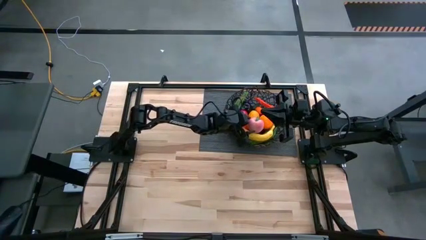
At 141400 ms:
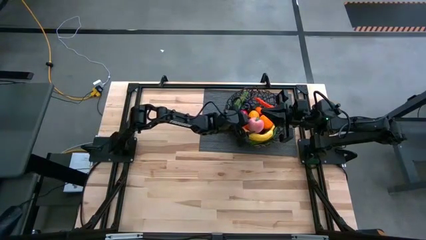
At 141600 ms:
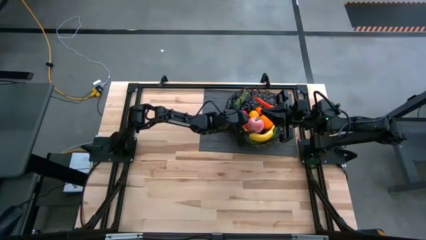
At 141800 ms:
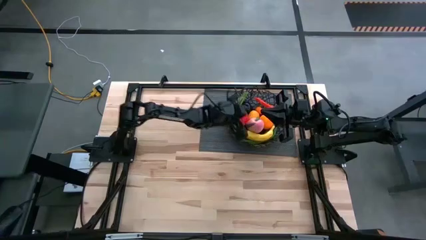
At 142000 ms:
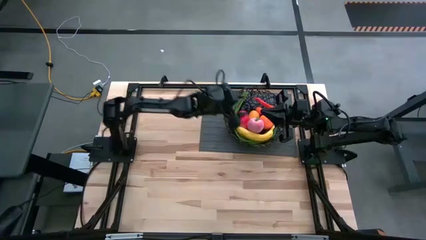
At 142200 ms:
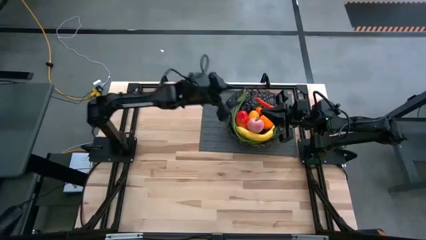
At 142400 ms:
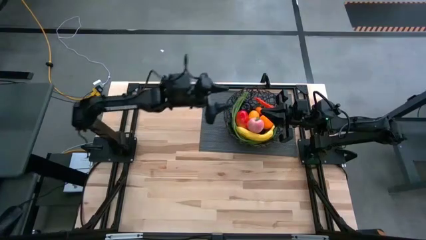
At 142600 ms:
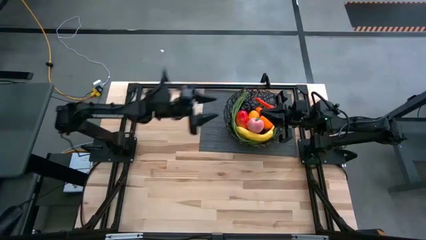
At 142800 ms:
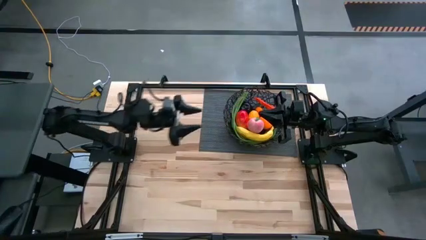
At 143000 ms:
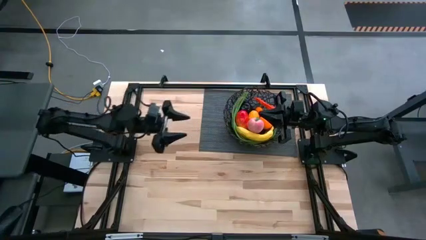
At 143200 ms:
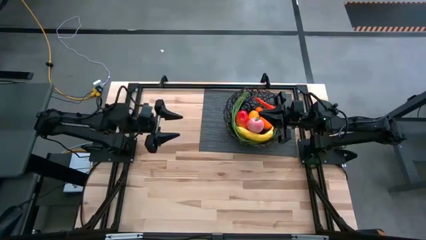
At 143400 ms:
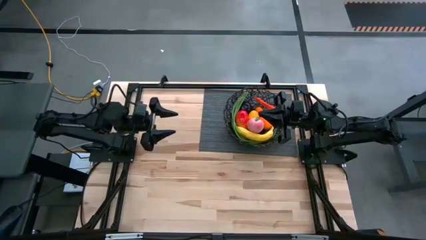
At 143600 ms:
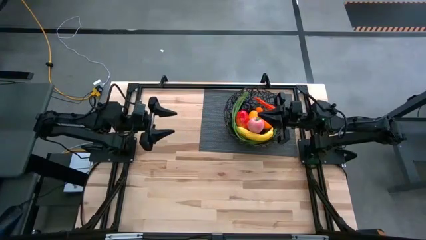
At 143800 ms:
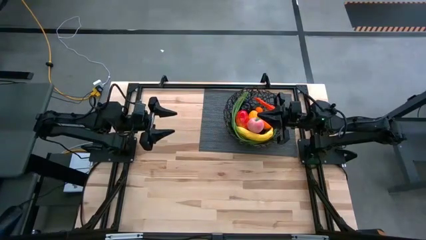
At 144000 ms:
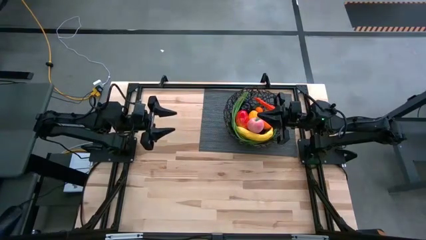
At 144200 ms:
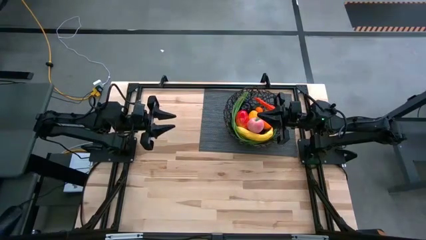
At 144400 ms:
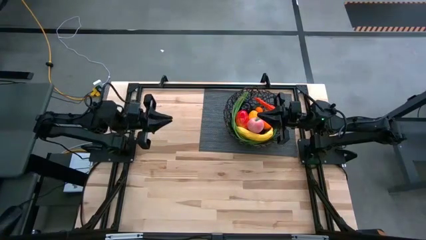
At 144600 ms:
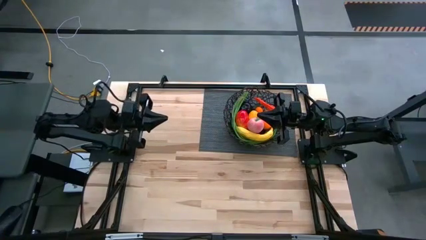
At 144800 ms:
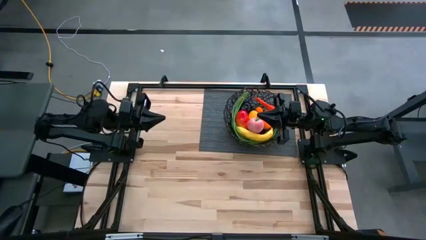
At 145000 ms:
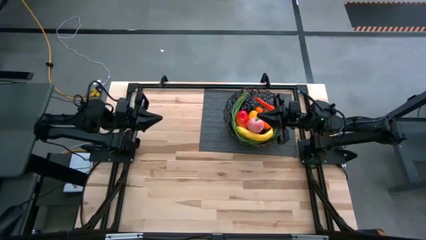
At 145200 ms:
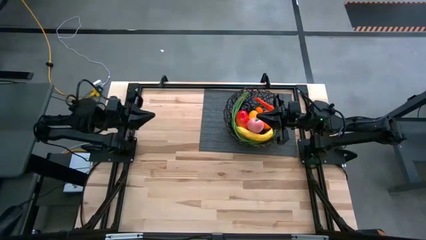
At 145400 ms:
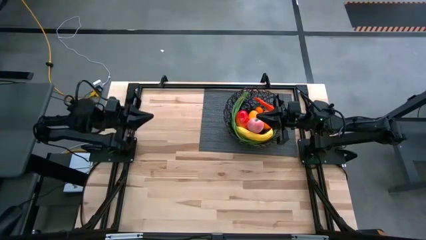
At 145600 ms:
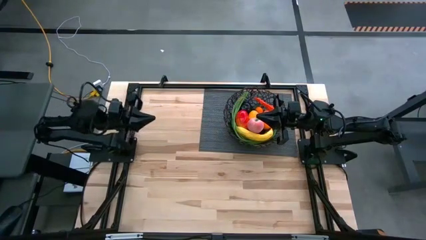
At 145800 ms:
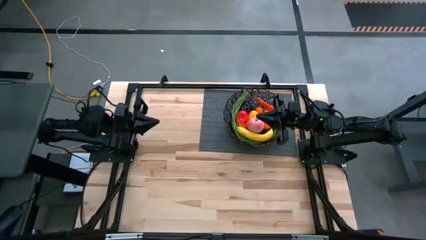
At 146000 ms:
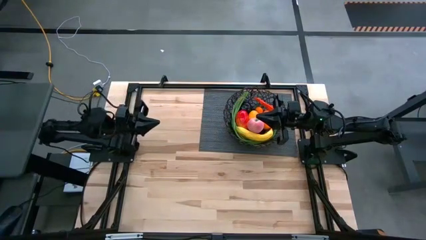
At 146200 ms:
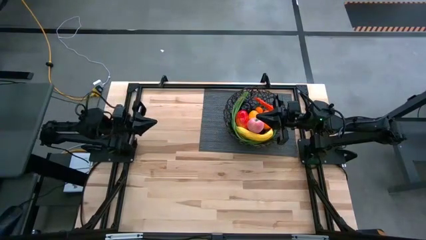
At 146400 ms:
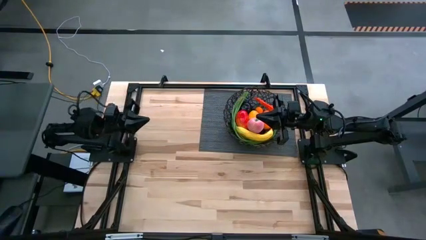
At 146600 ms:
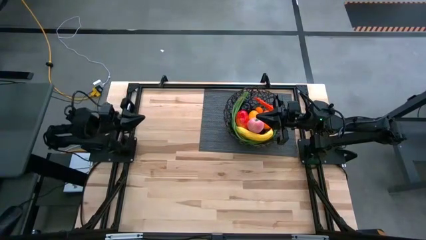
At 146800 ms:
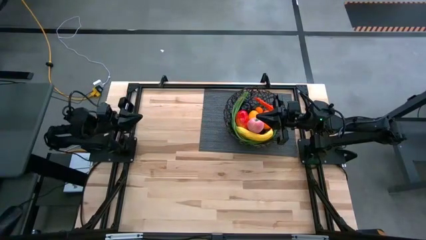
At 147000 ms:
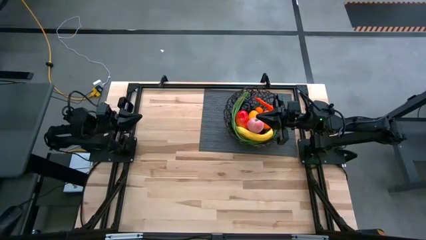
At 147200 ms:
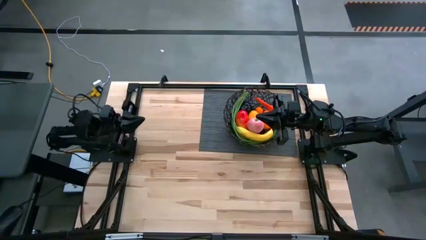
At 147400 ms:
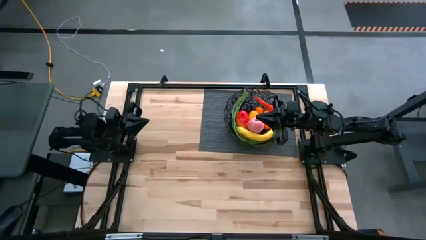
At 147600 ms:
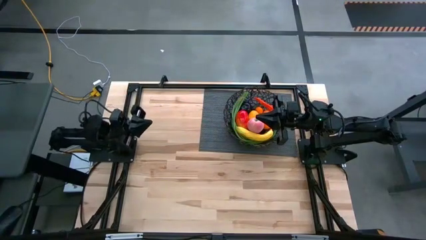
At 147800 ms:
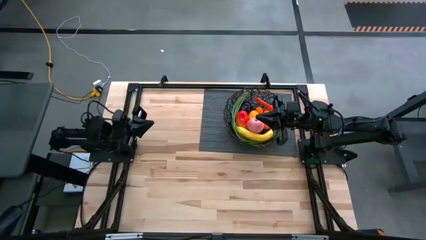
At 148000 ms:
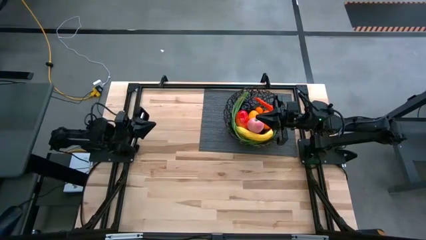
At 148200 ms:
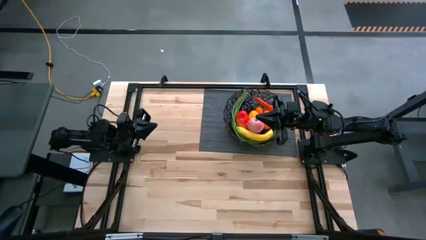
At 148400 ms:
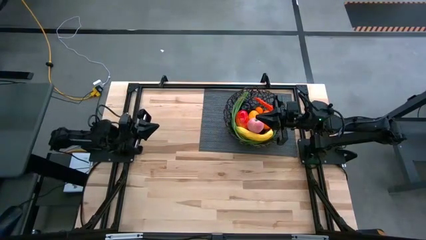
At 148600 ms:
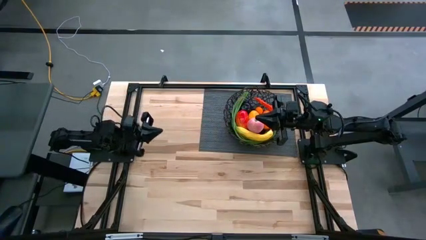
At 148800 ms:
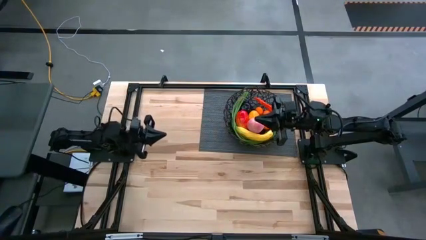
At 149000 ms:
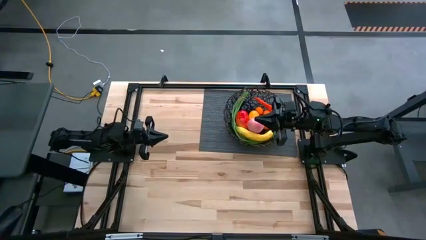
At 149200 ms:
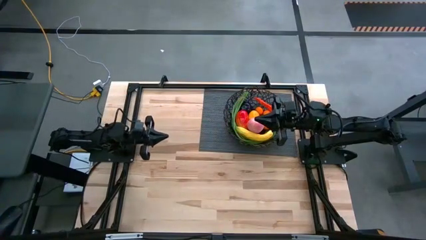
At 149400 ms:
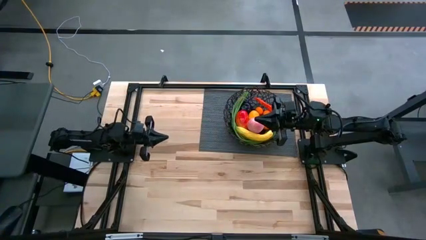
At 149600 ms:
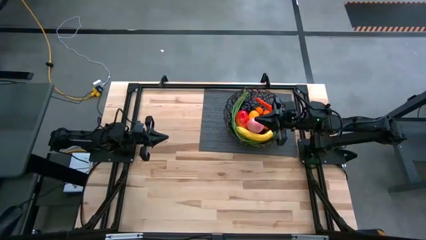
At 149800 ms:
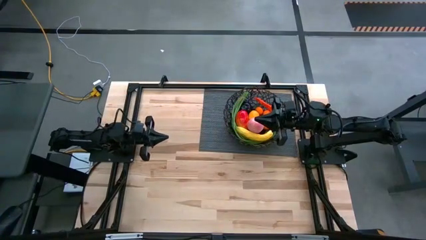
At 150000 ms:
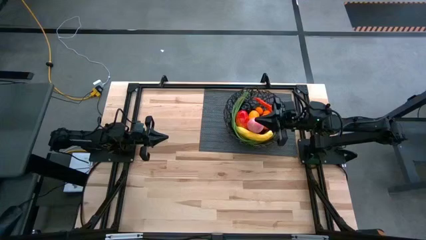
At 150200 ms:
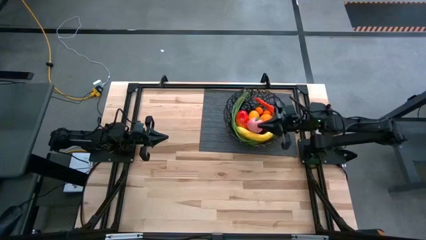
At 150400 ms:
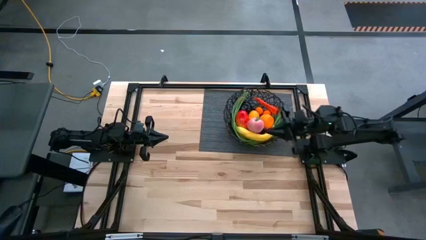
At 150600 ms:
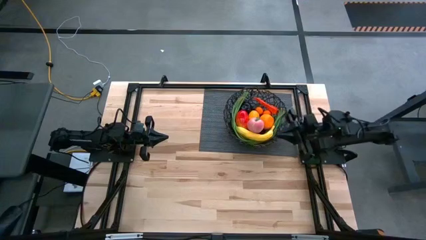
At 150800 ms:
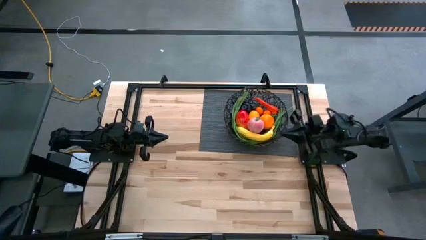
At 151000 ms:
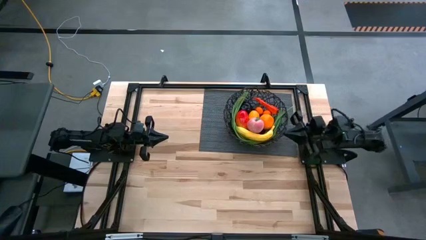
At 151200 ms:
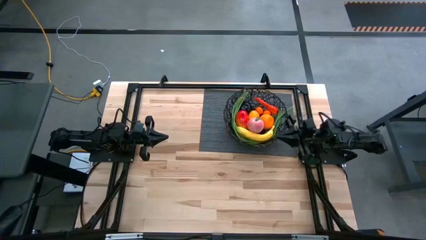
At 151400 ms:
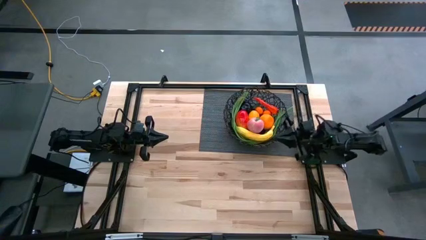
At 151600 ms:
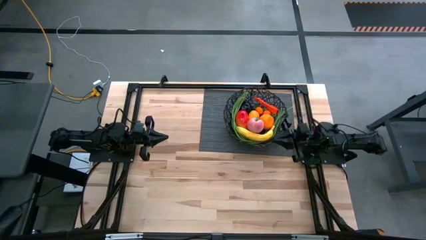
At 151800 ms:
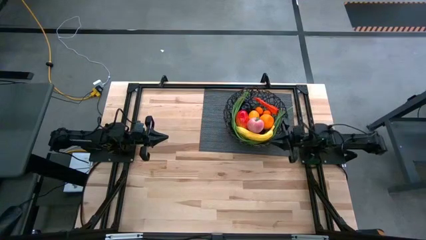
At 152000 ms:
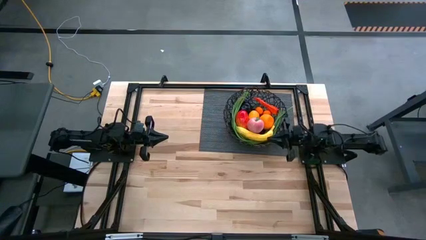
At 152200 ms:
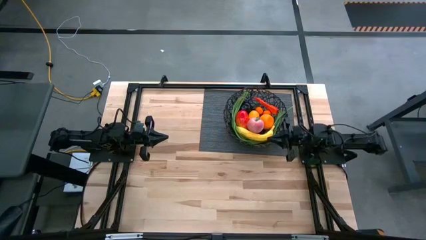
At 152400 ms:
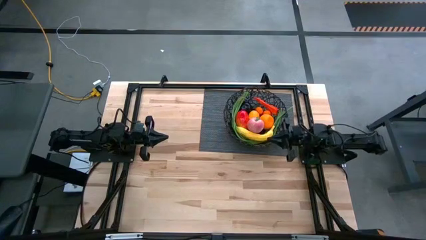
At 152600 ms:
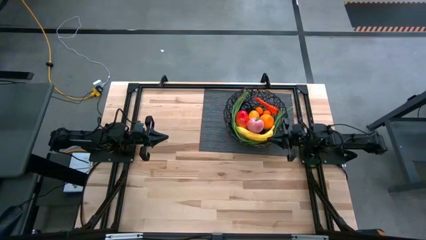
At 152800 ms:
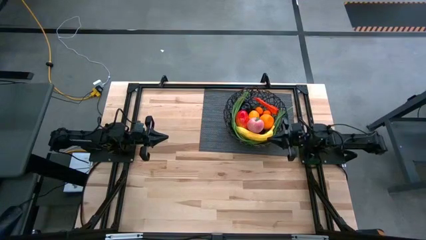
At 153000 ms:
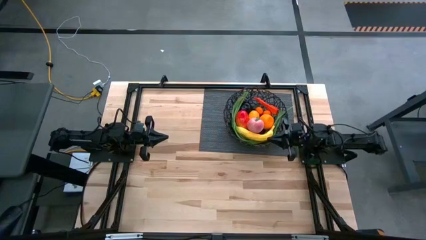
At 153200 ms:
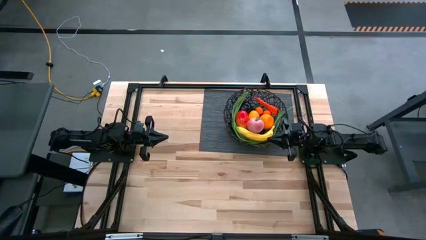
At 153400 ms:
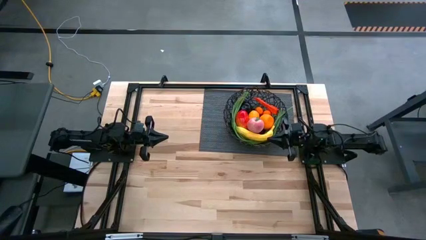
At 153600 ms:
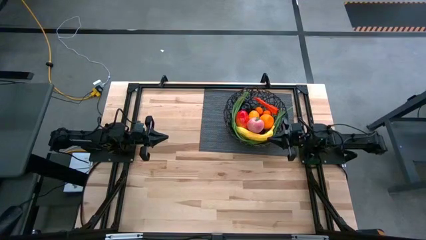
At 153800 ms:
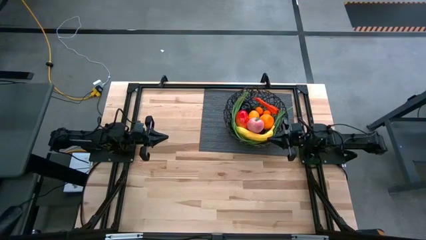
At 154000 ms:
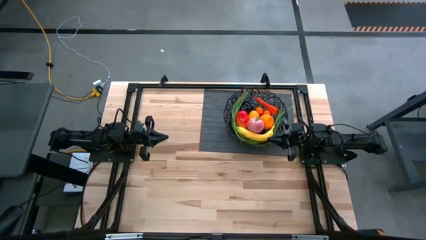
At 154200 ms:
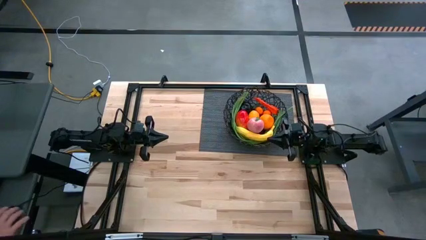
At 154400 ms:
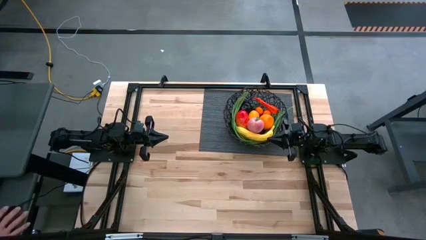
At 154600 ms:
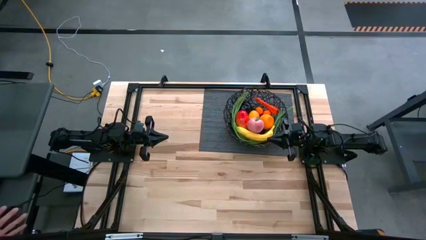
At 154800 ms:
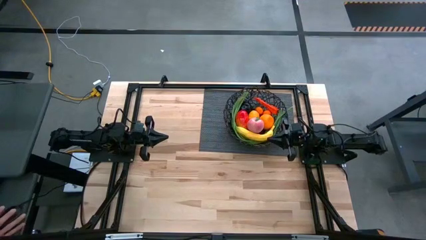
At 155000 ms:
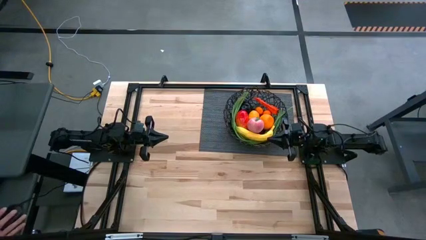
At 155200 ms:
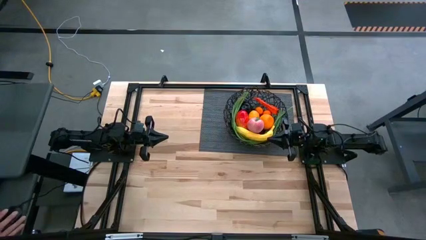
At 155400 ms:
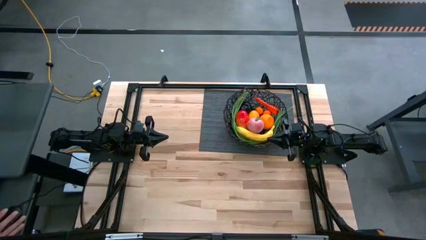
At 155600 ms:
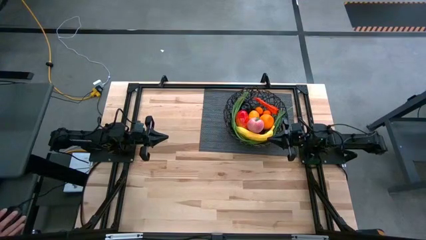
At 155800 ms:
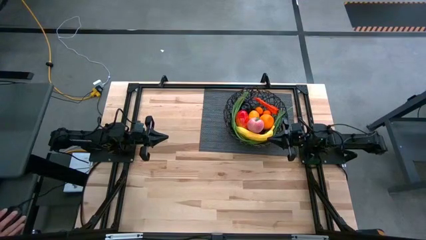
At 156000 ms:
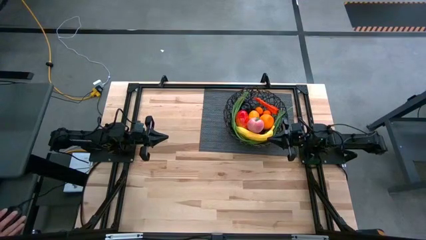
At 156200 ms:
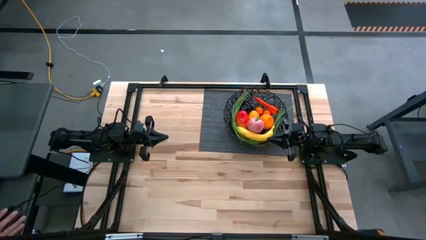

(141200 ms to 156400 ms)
Task: Build produce basket
Return to Home Position

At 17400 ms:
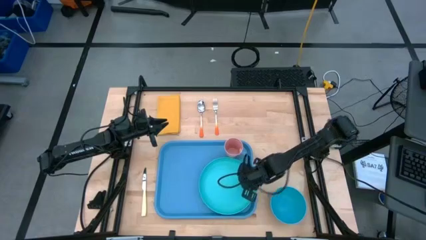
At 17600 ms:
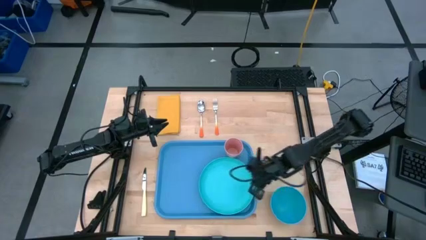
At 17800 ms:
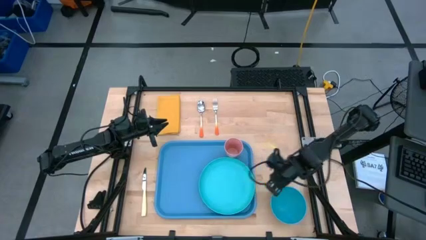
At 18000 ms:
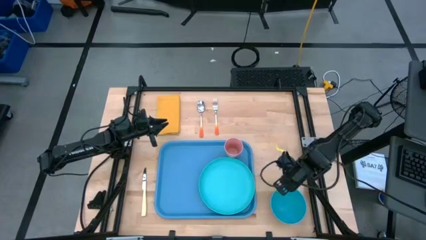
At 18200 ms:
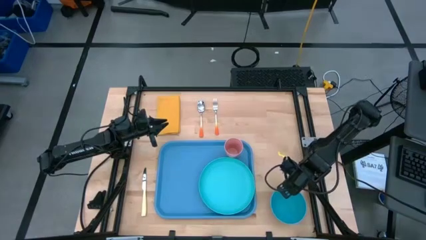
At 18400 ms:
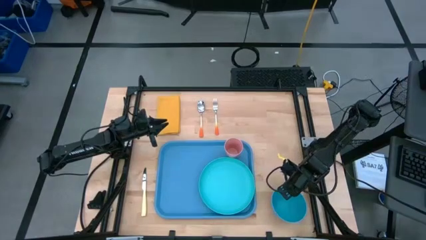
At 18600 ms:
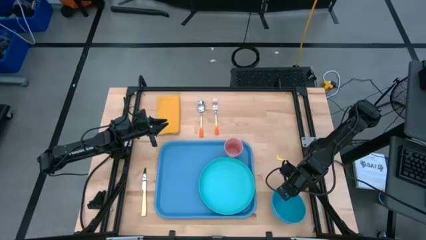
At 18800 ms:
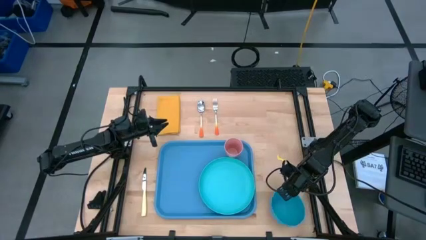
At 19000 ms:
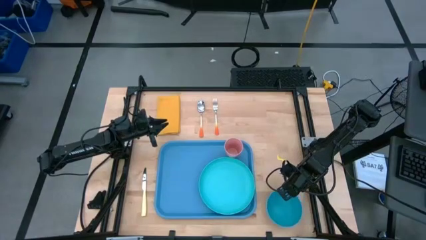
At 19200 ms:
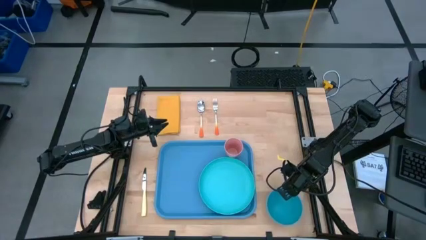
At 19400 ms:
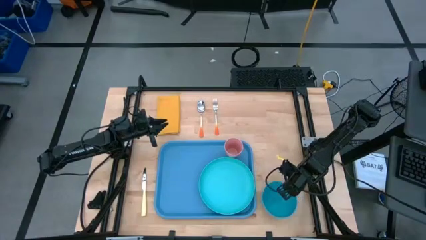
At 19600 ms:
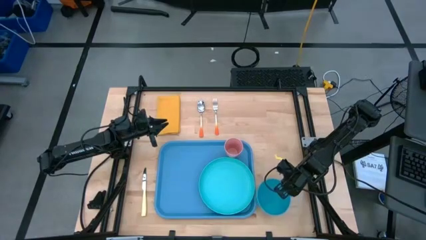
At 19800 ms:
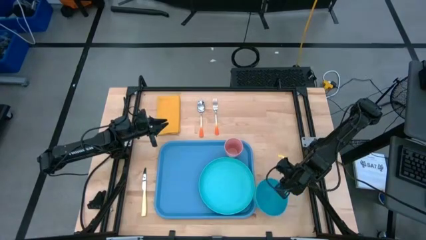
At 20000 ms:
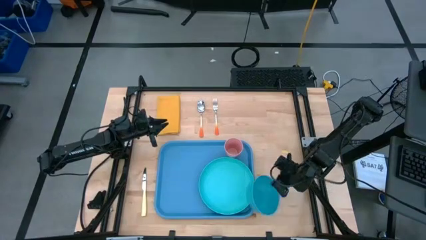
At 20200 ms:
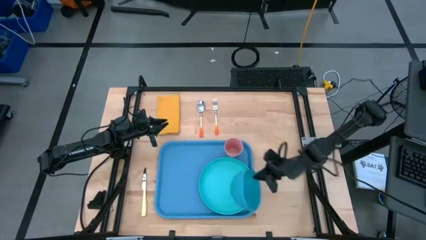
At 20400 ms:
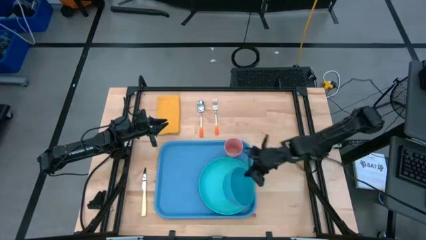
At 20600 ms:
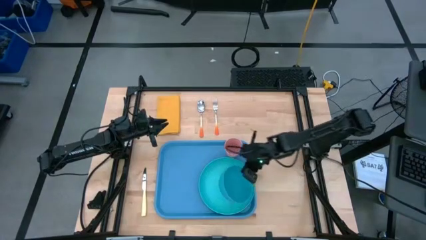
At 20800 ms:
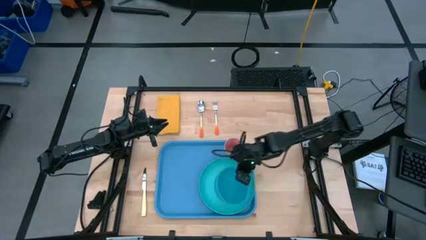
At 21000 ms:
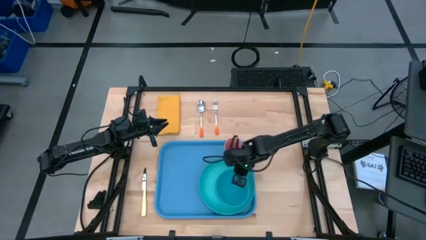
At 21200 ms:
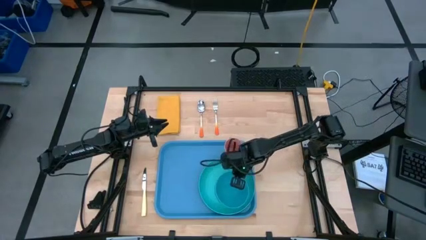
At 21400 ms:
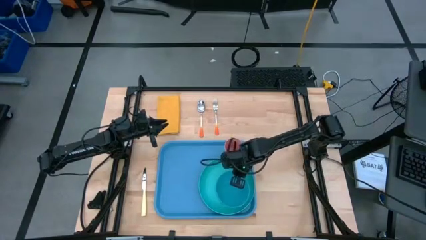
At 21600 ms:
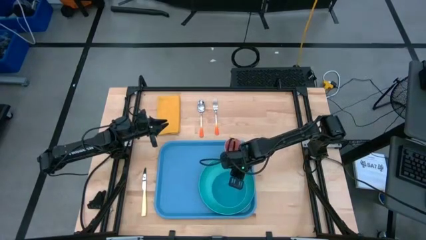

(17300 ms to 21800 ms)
Task: Set up tray
Put the blue bowl on the green plate
